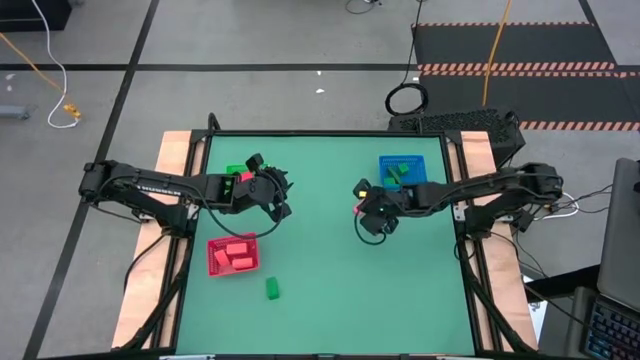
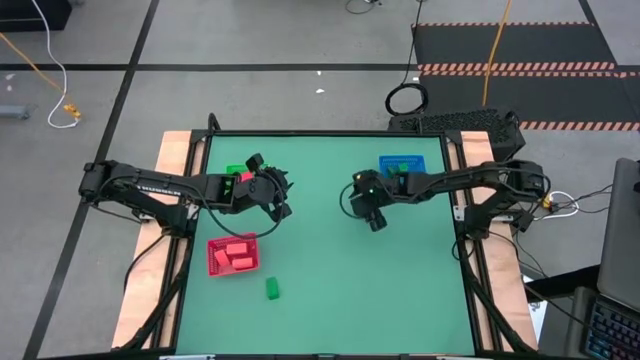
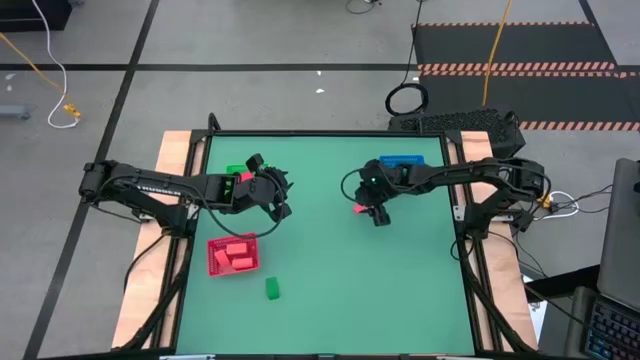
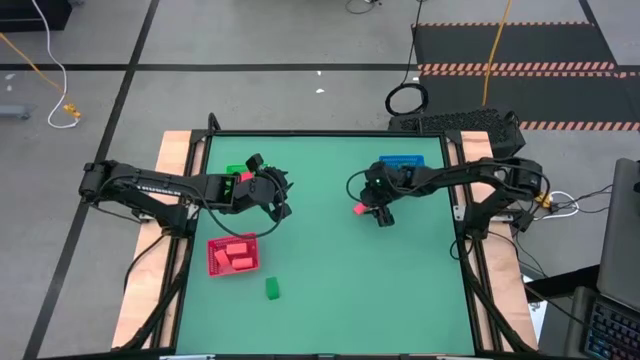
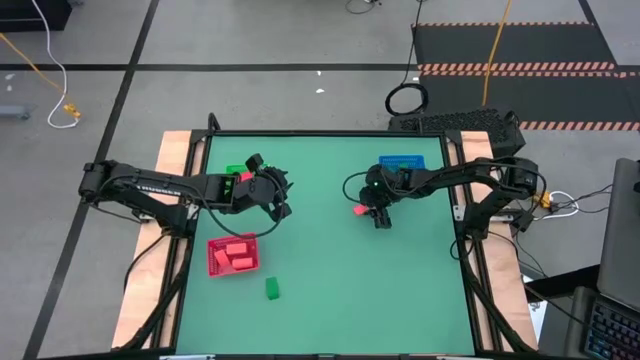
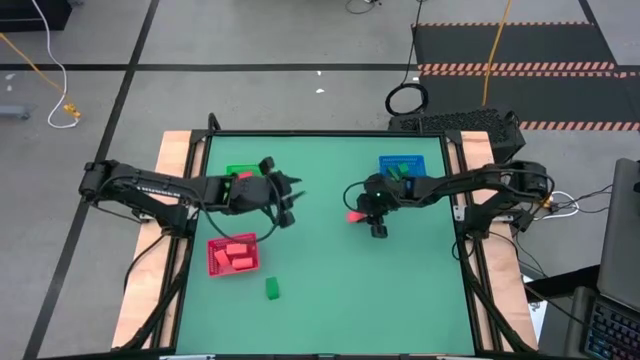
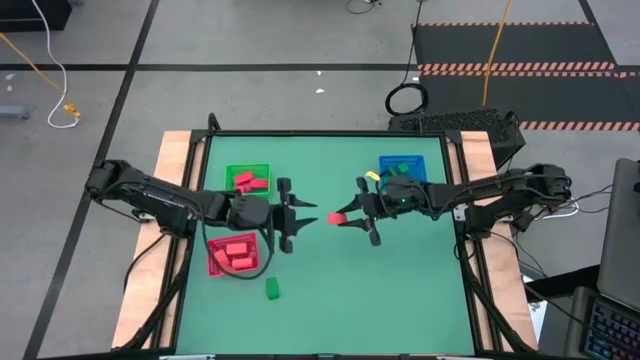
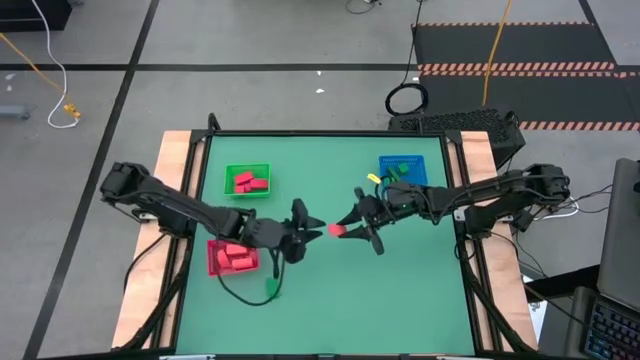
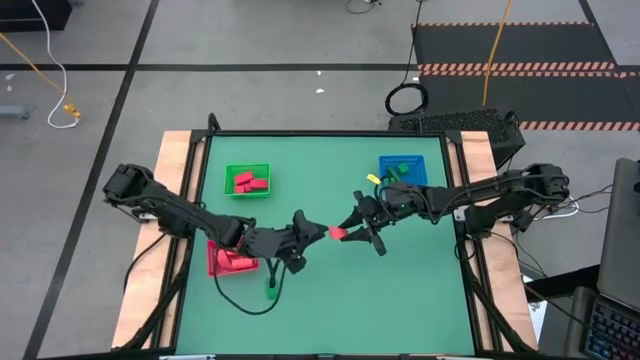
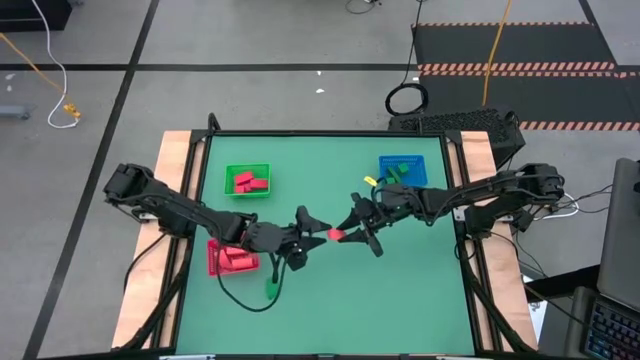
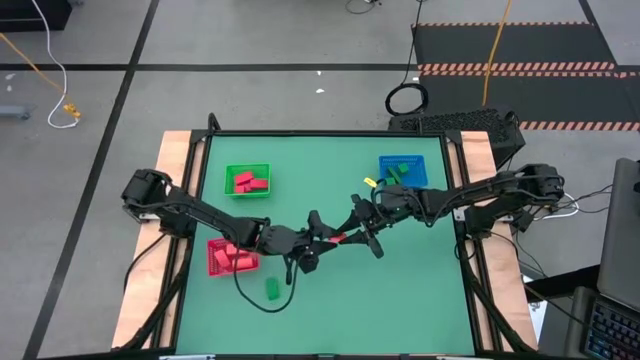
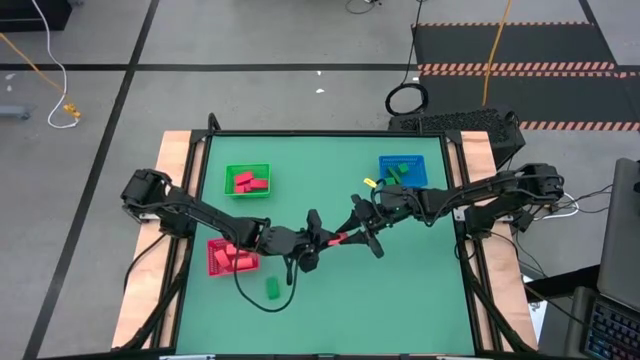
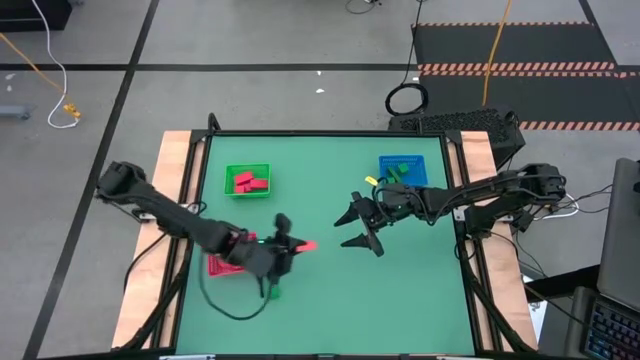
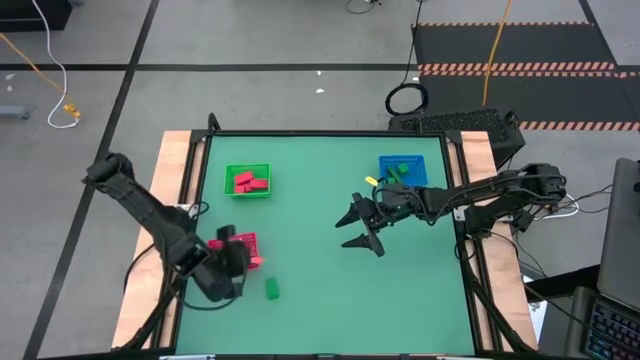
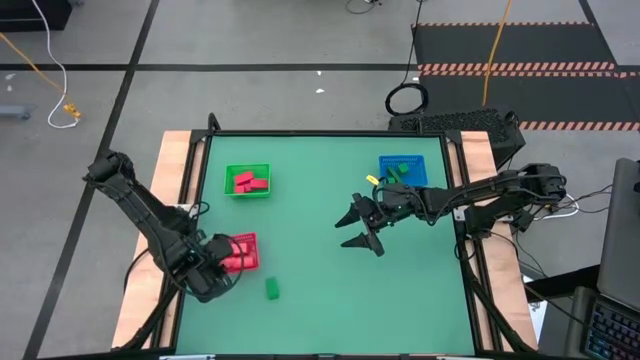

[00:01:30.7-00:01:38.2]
Task: Sort & place blocks by color
Put the orange block into the bin

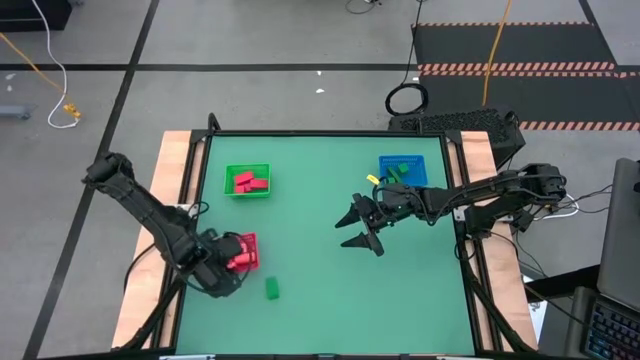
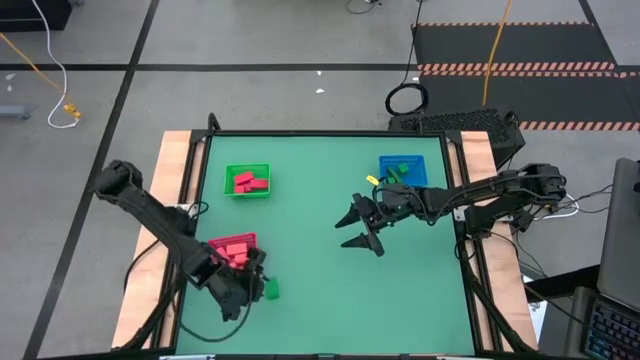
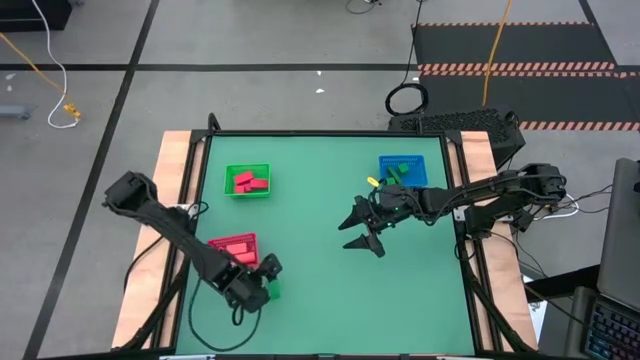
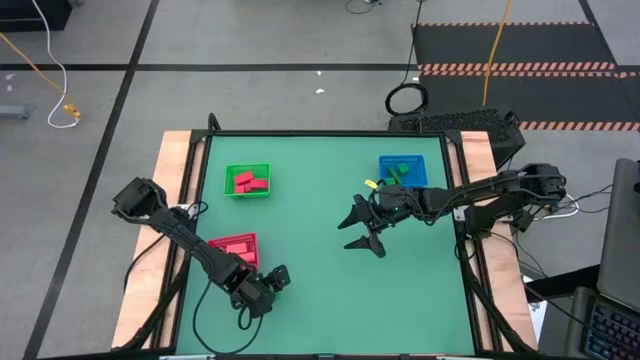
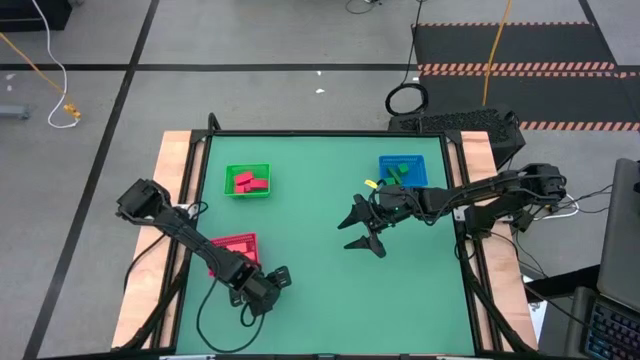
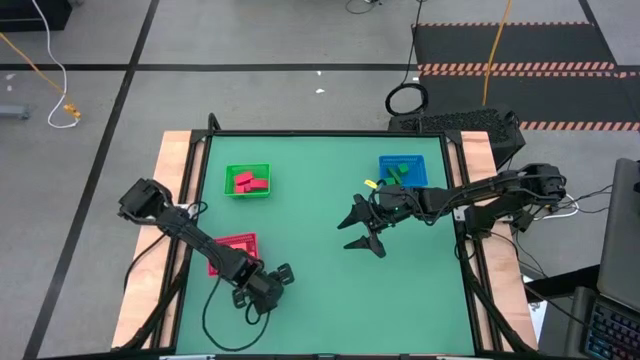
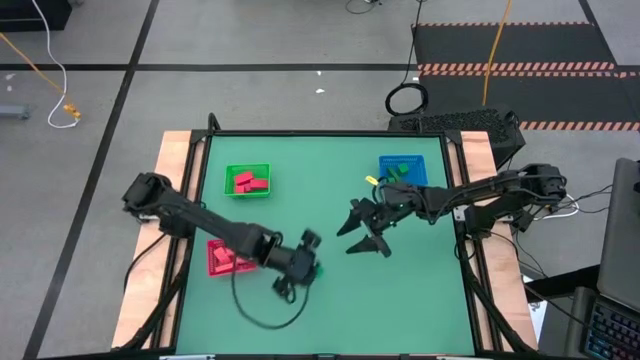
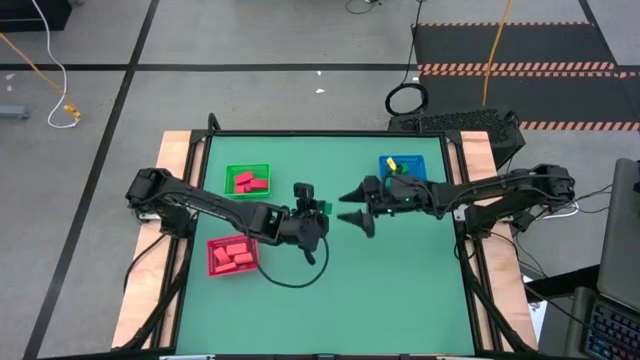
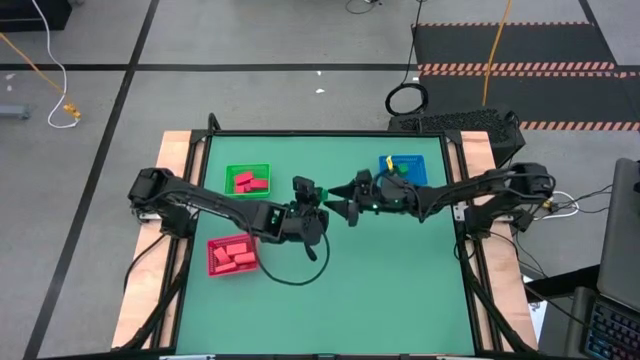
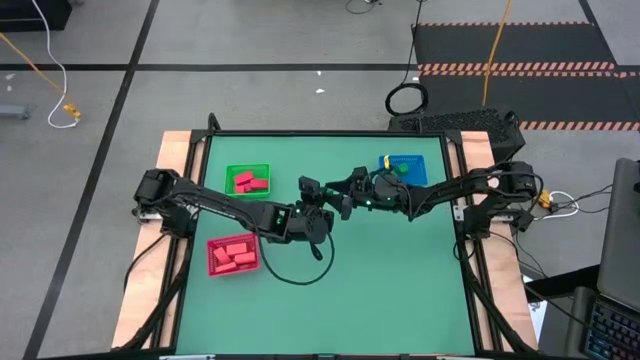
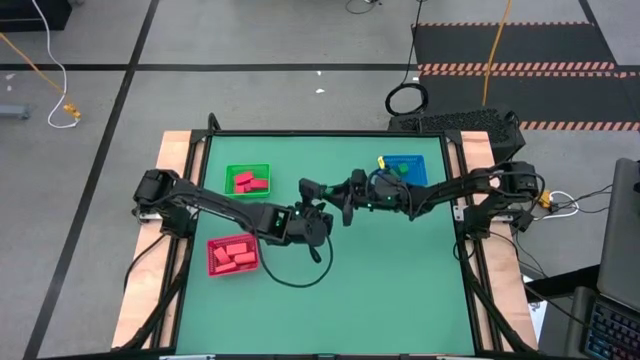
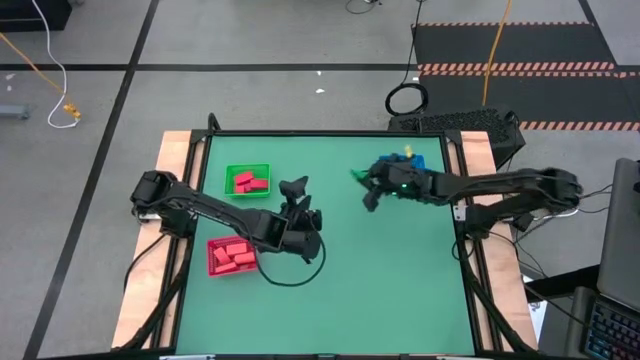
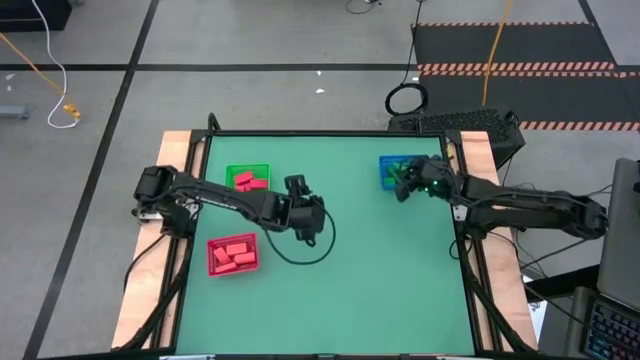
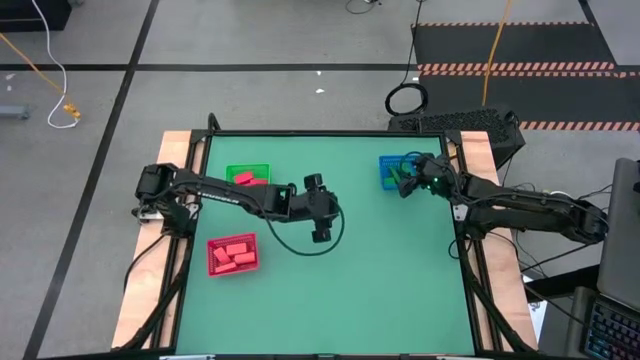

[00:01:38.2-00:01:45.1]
Put the block into the blue bin

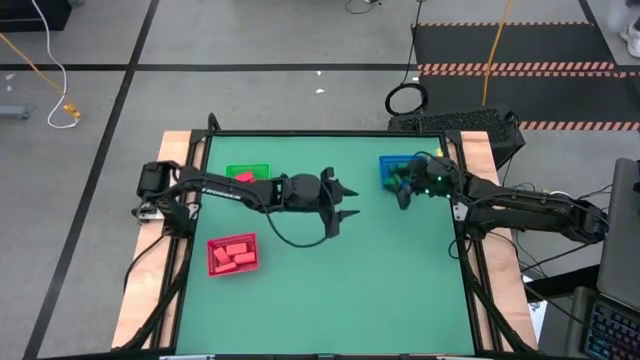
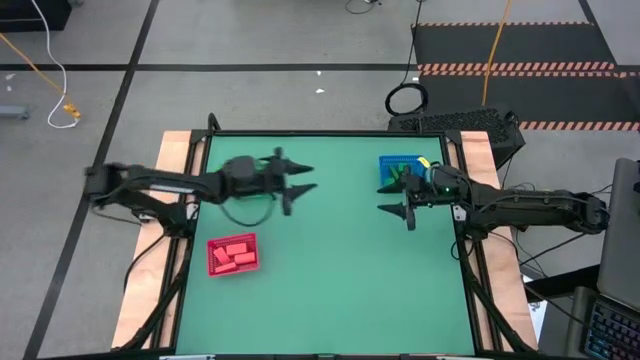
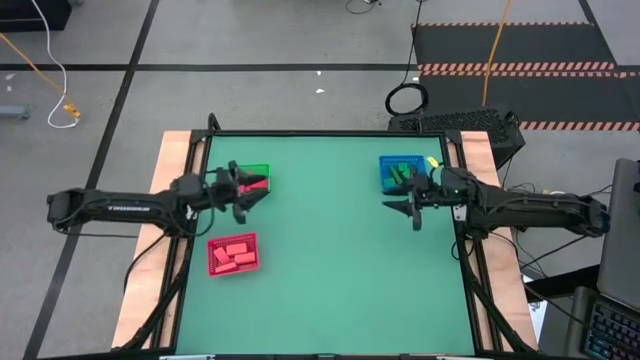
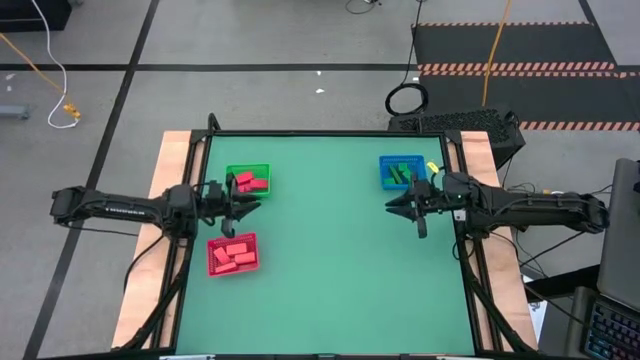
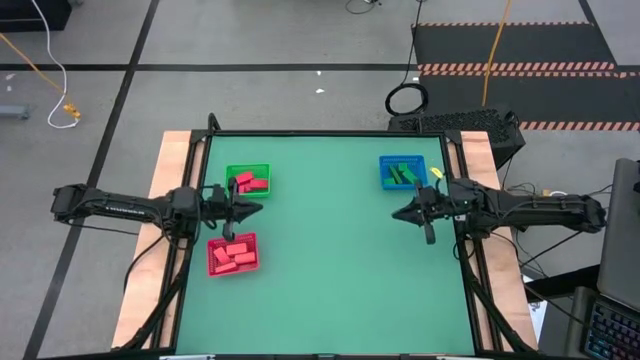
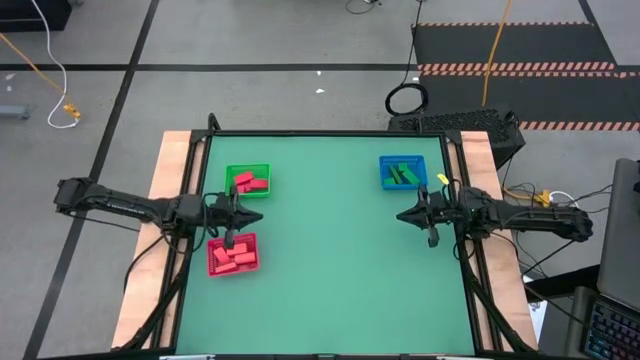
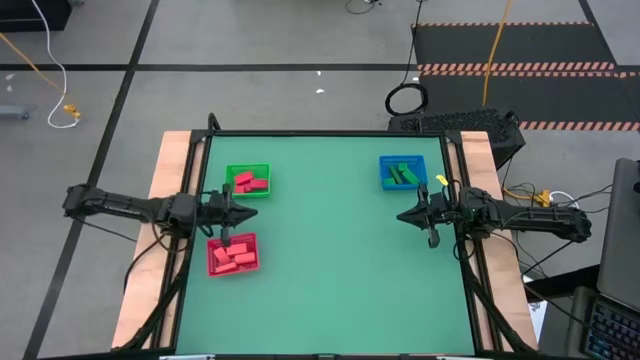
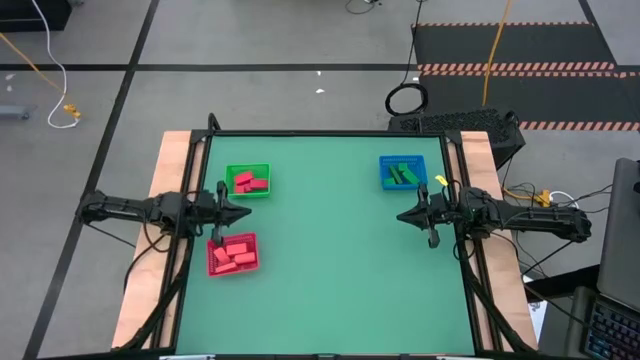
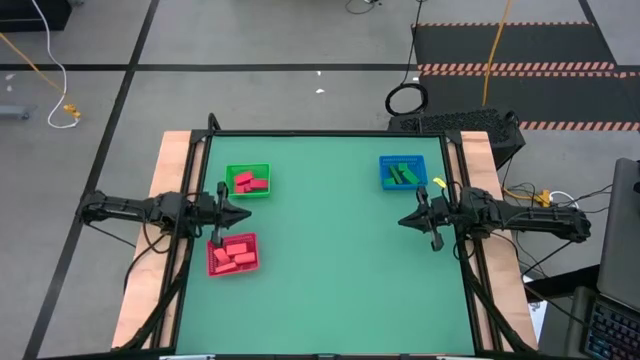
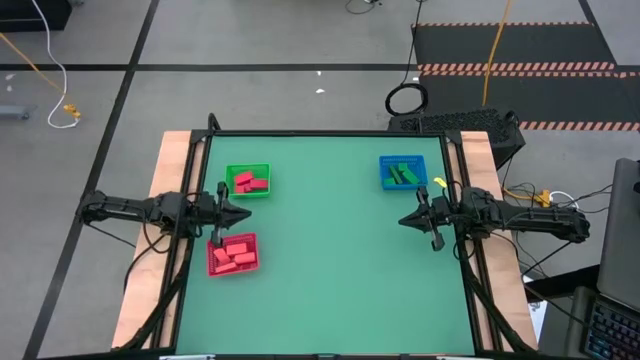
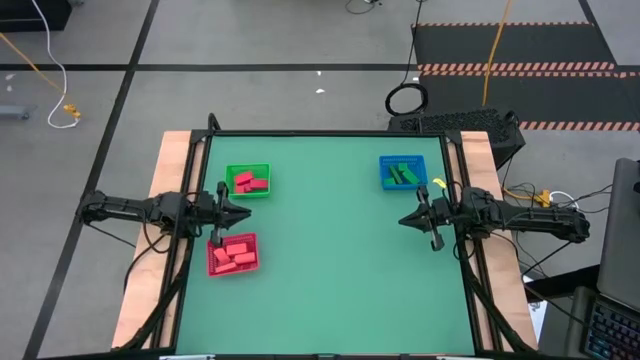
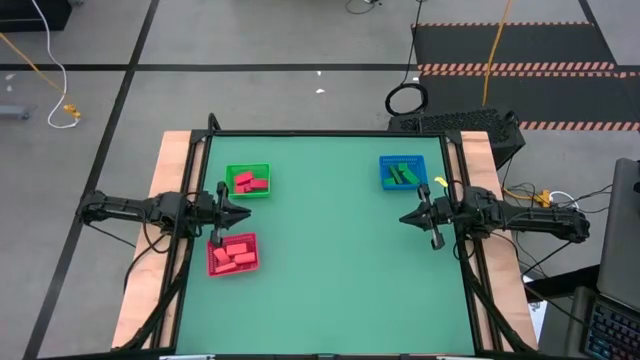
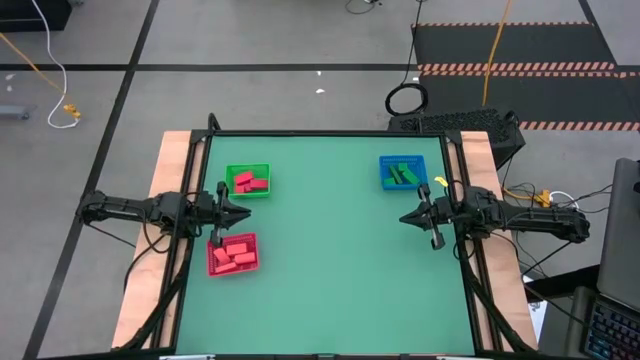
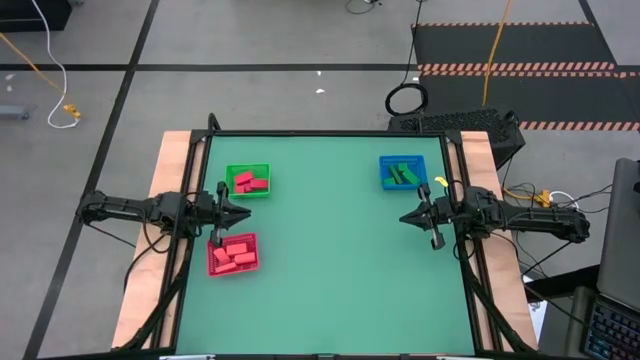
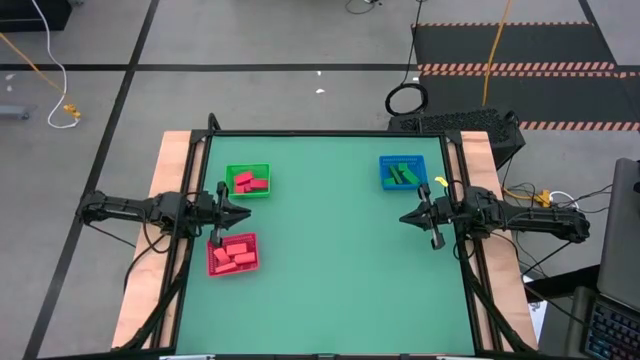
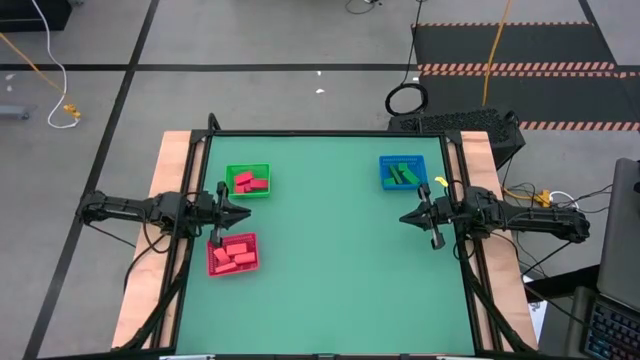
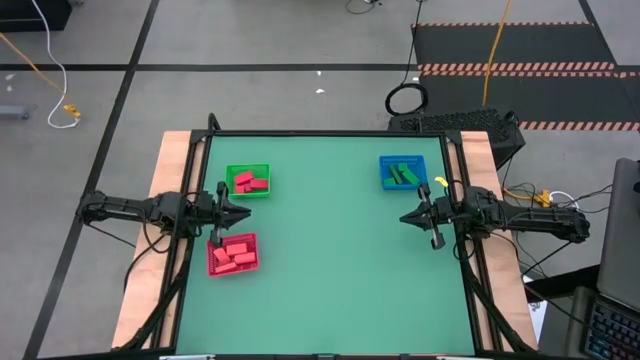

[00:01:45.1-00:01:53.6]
Return to Home Position
